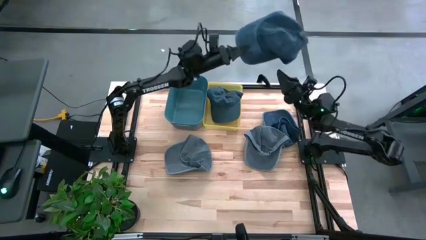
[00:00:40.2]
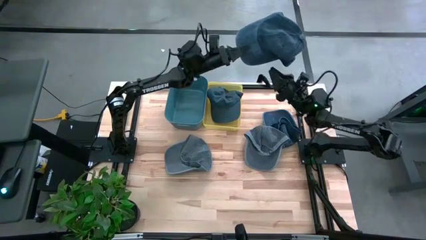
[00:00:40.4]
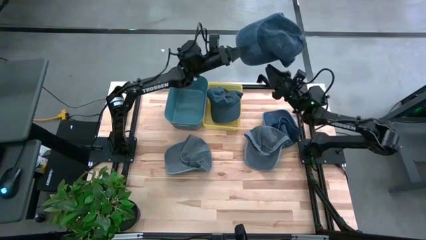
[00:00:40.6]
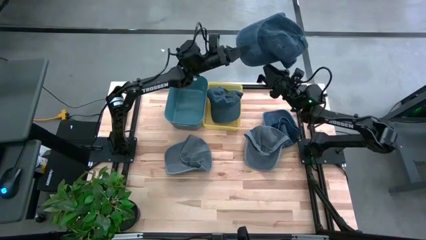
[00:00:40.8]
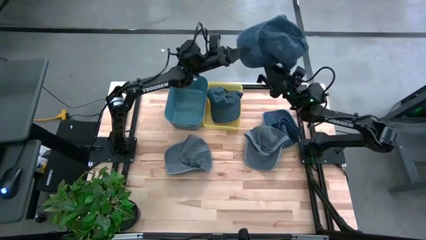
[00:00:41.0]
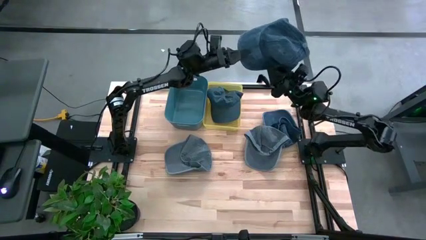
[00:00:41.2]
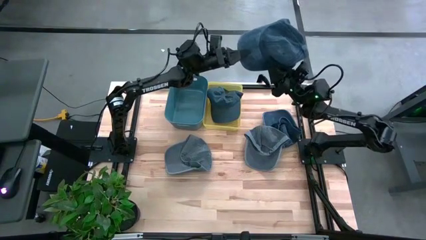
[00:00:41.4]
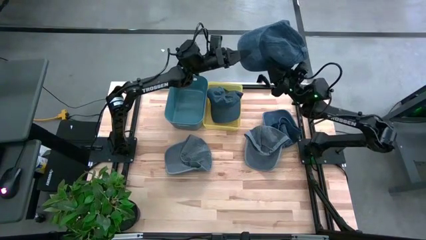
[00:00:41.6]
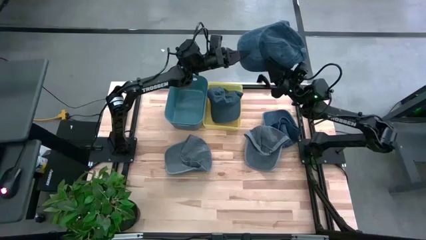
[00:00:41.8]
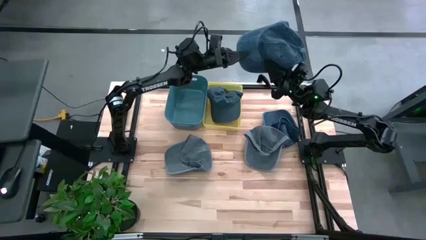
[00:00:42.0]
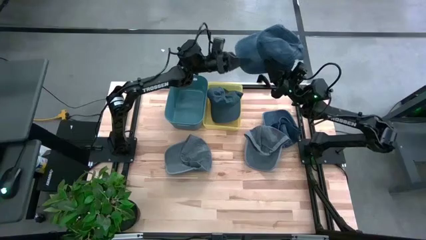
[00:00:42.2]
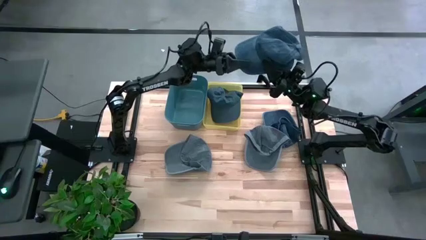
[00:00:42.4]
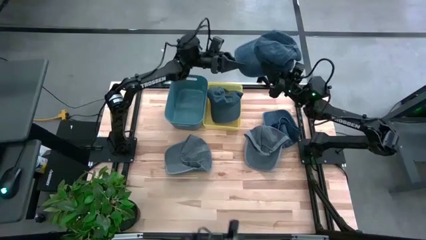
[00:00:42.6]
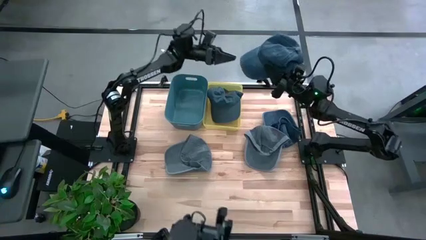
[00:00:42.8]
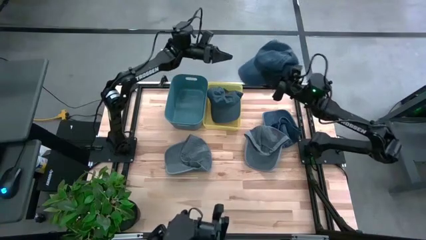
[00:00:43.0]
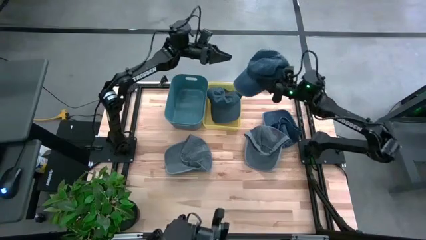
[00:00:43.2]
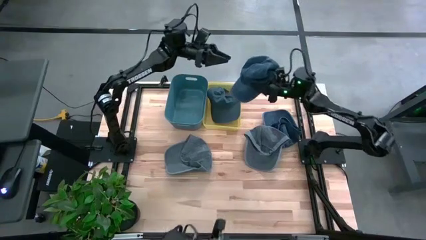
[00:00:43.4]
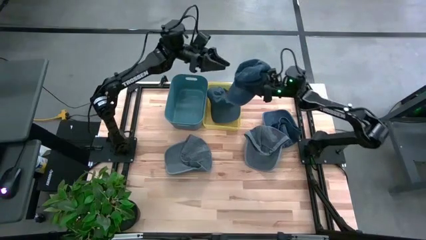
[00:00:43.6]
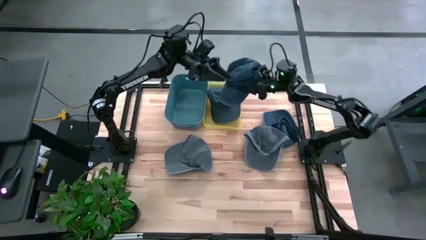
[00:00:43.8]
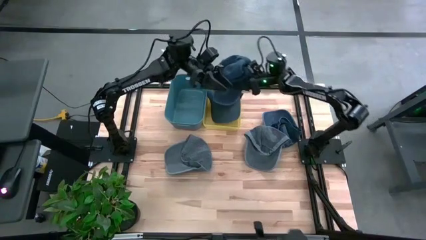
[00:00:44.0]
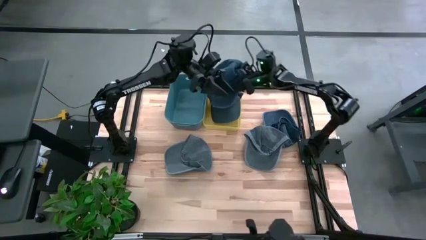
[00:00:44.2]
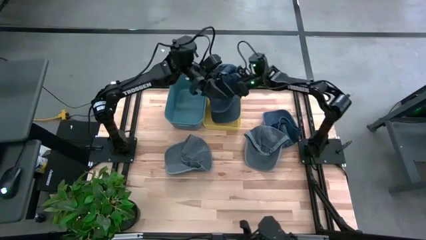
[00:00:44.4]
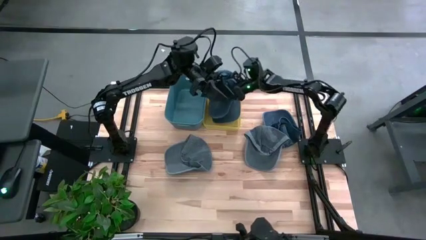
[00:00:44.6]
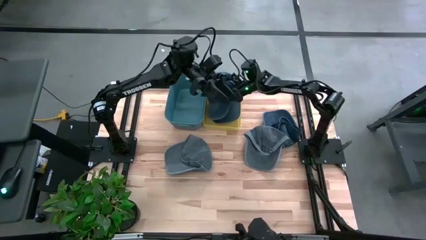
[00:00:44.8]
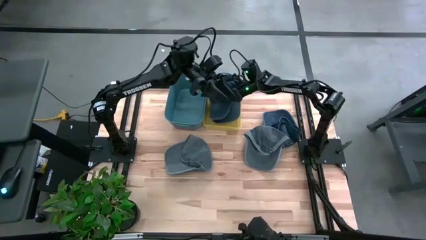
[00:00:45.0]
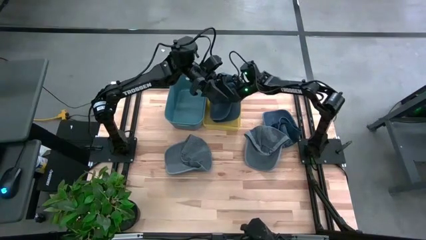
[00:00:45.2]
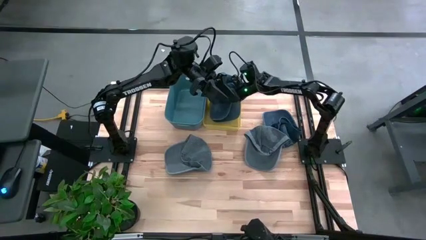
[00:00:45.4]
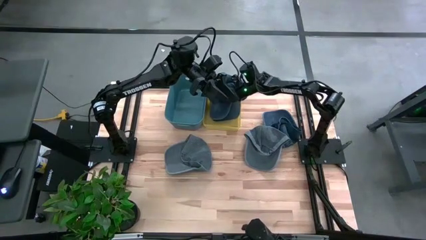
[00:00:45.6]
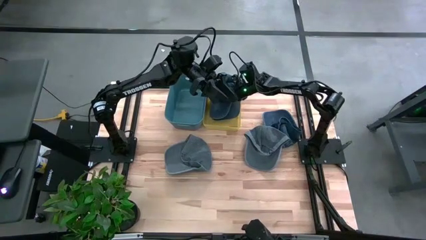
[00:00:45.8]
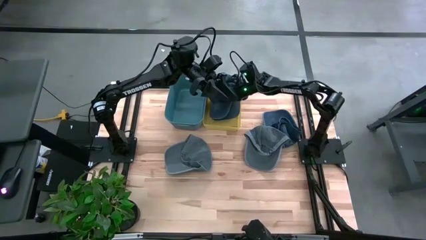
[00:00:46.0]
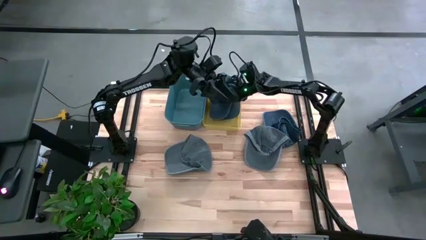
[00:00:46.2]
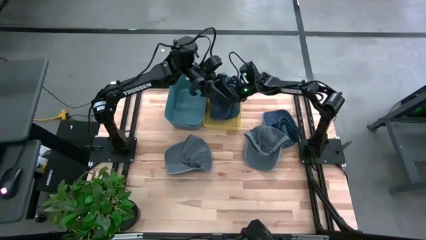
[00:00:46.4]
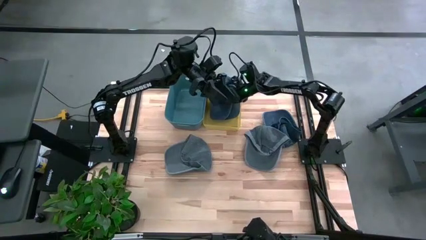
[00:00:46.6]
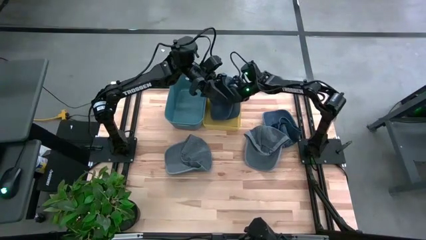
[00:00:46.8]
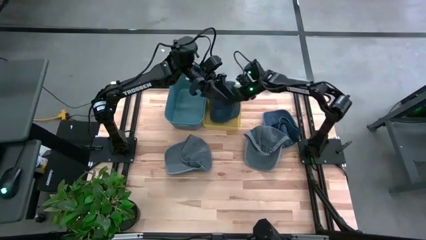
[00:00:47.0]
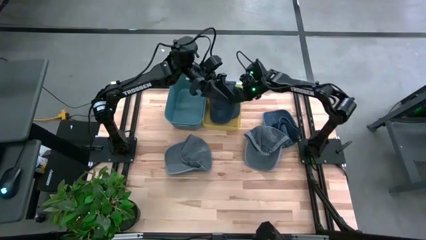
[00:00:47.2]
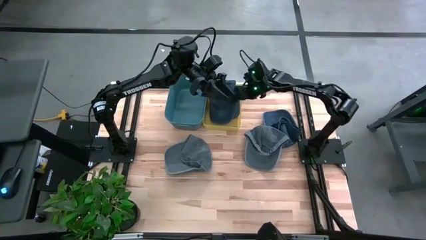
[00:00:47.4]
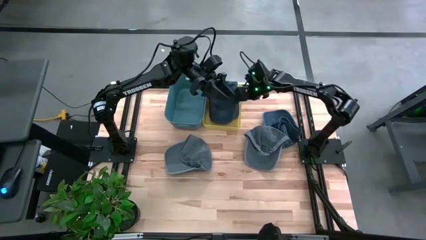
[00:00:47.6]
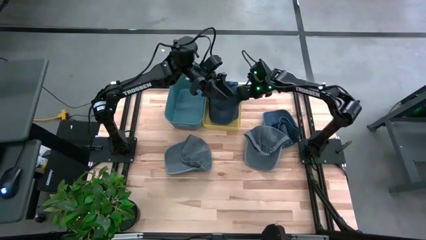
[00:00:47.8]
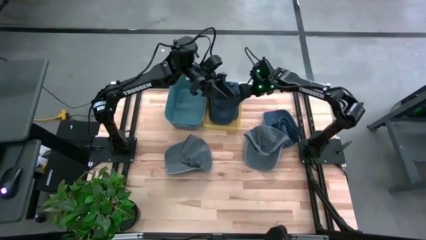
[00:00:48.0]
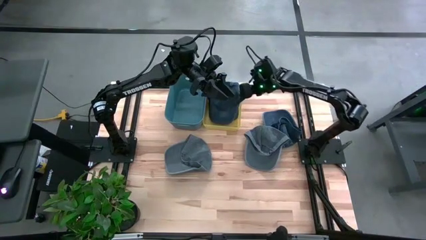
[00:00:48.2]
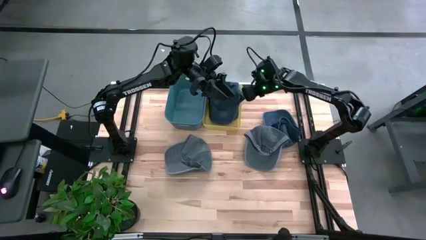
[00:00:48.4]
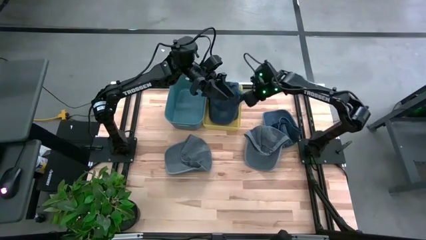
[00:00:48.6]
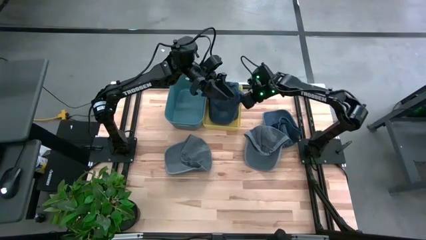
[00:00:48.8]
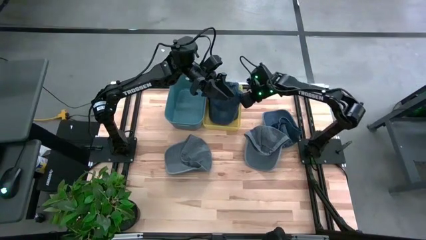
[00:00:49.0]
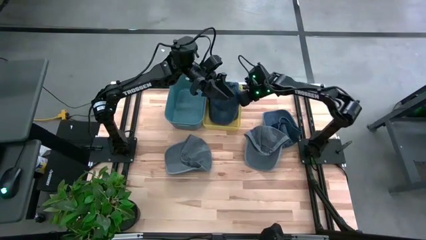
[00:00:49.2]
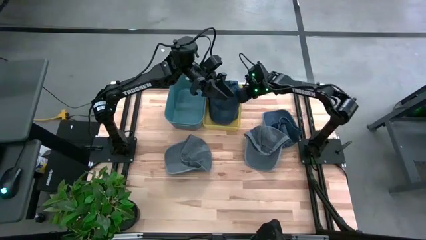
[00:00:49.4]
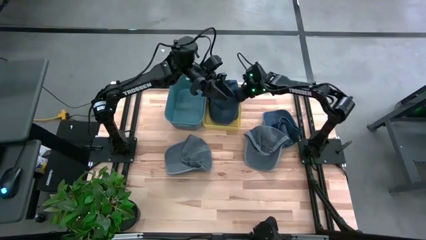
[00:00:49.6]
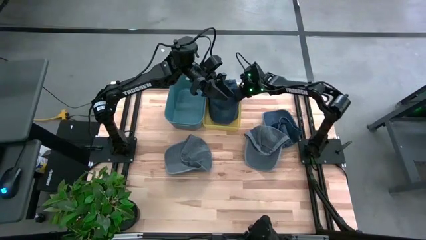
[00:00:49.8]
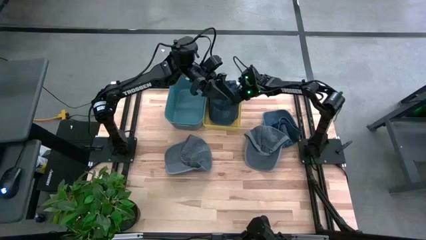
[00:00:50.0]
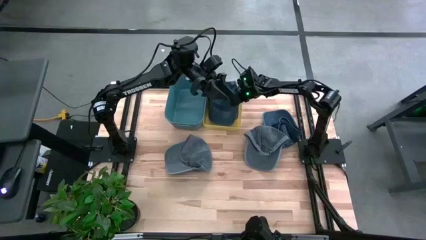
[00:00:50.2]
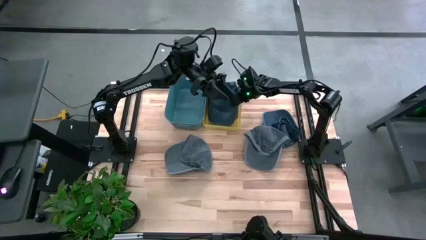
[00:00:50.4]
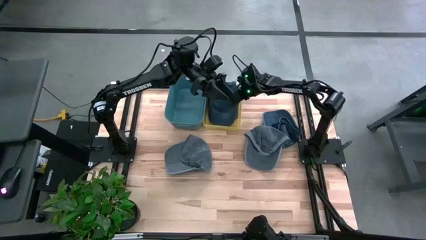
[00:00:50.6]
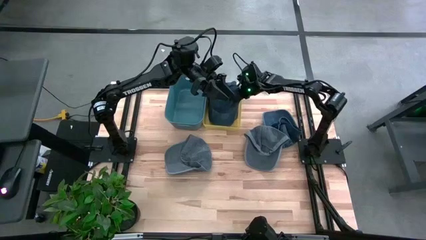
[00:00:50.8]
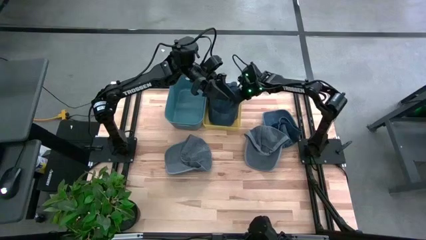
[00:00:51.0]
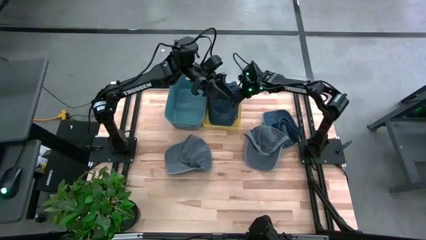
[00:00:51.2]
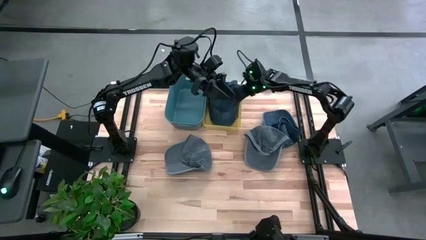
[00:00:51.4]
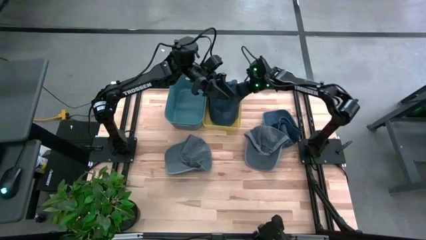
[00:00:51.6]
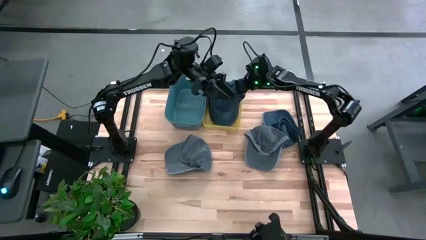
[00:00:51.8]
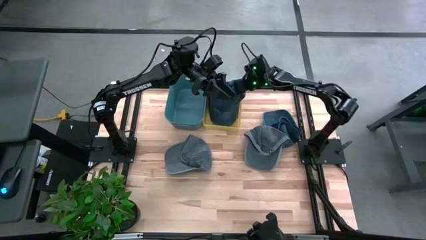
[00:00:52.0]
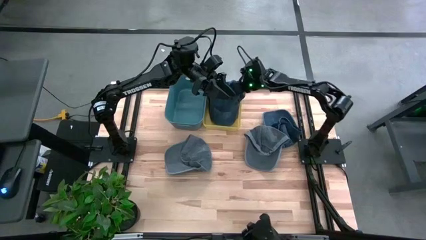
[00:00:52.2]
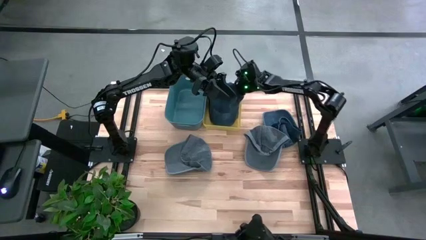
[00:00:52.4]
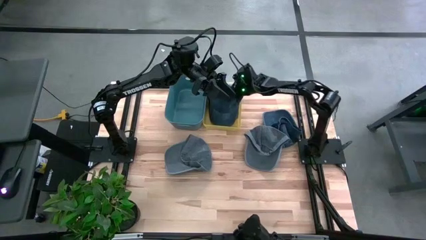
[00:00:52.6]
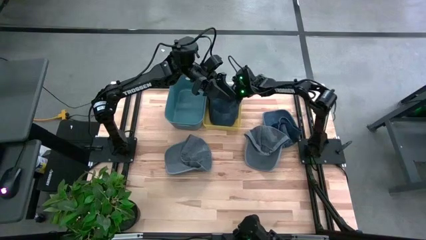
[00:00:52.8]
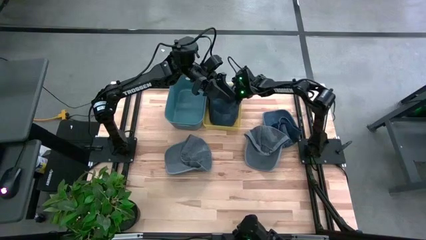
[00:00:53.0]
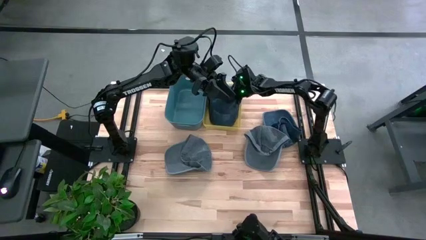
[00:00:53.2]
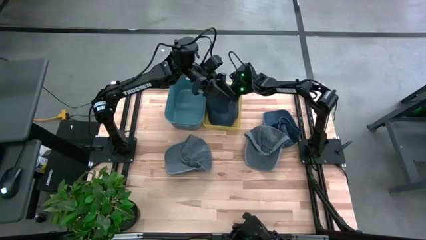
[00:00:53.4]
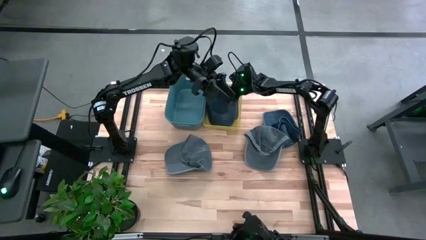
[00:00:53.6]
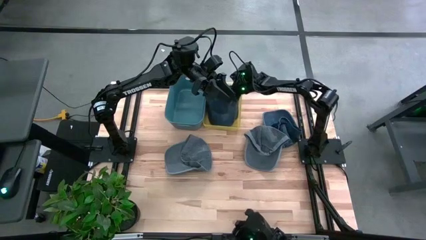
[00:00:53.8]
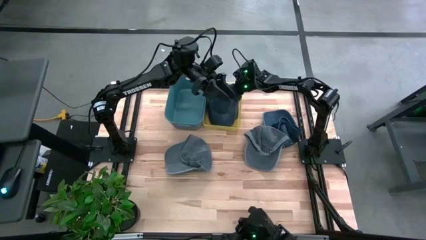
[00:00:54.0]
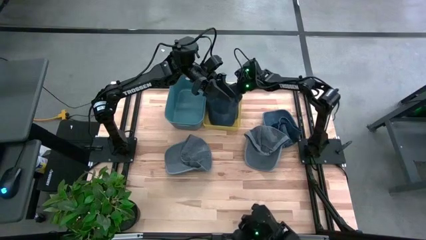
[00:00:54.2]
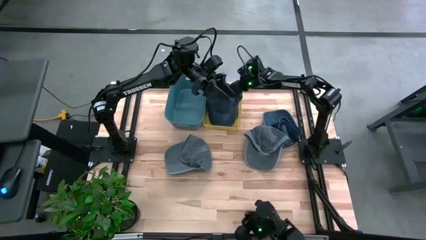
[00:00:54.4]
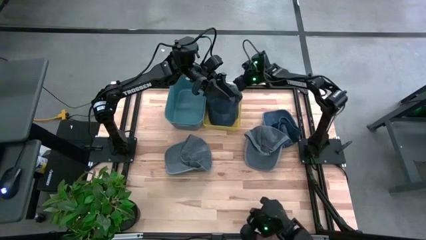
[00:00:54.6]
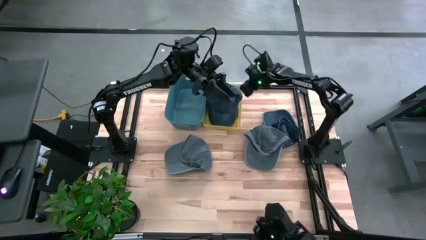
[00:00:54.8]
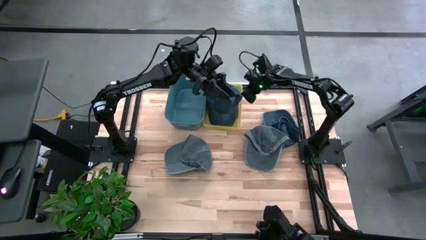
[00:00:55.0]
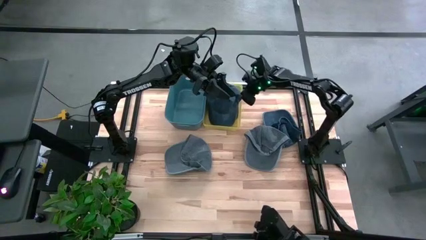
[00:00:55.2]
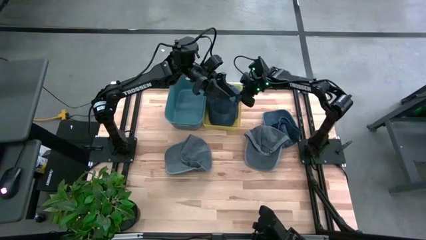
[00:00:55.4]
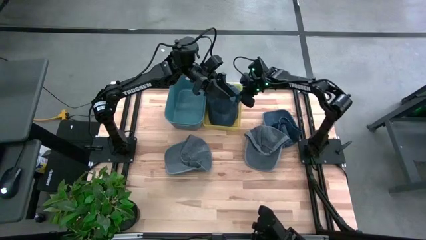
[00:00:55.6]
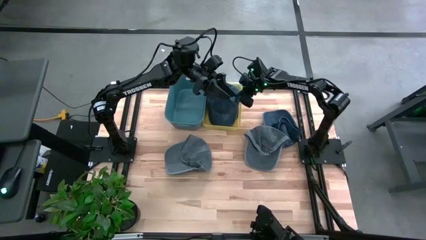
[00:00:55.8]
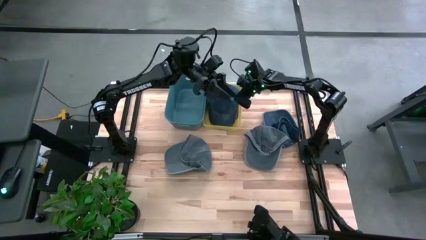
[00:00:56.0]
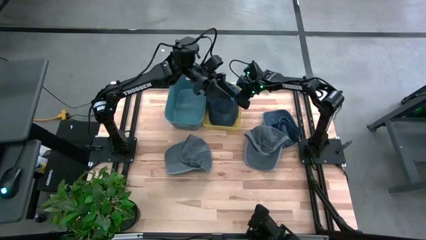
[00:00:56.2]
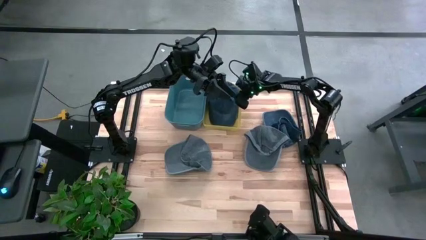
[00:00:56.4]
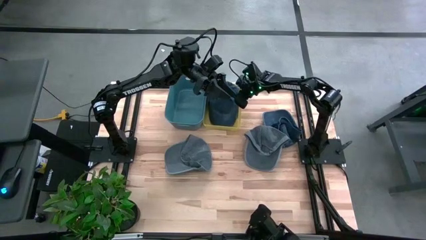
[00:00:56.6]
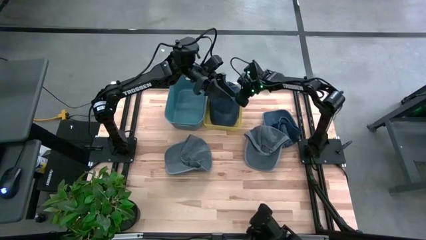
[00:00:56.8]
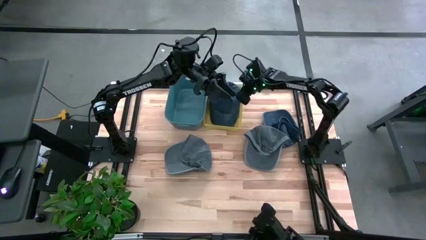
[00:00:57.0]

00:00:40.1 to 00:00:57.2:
Task: Pick & Place hat
Put the bottom blue cap into the yellow bin
